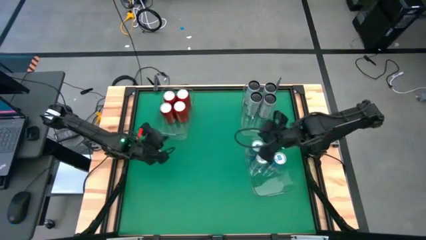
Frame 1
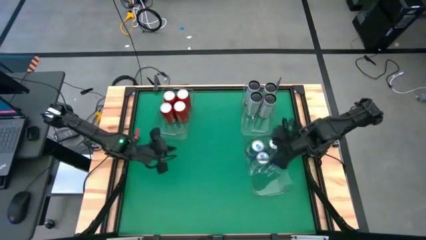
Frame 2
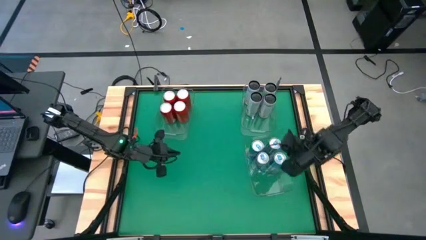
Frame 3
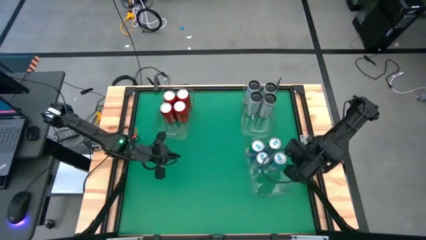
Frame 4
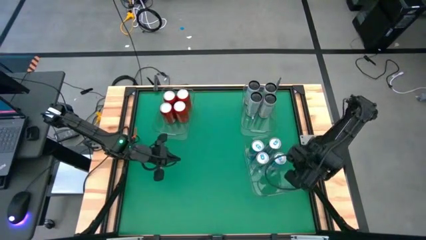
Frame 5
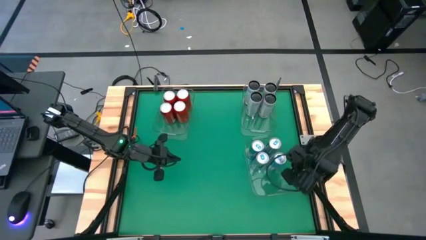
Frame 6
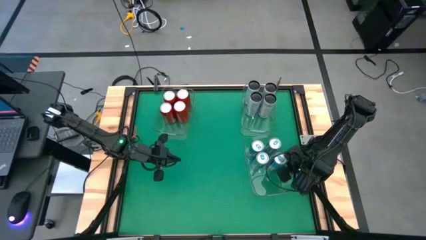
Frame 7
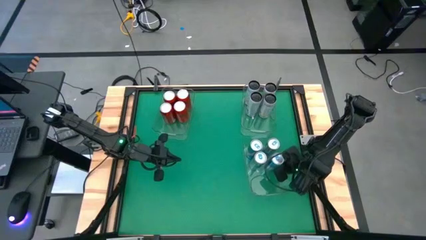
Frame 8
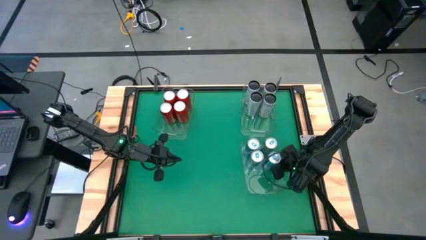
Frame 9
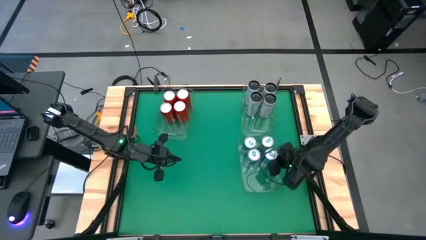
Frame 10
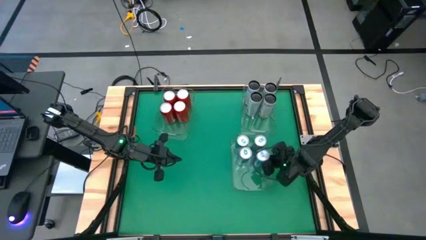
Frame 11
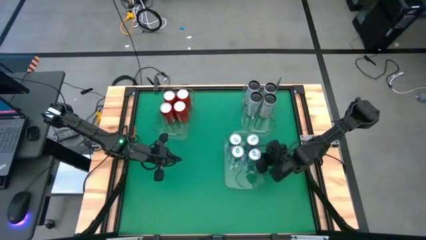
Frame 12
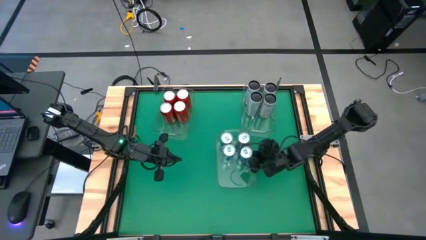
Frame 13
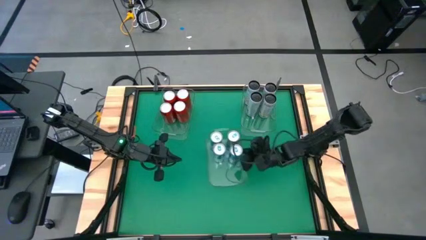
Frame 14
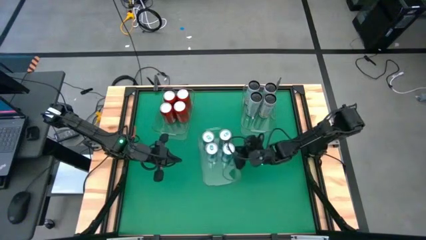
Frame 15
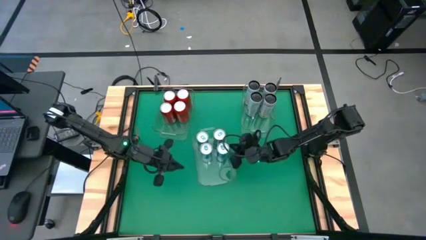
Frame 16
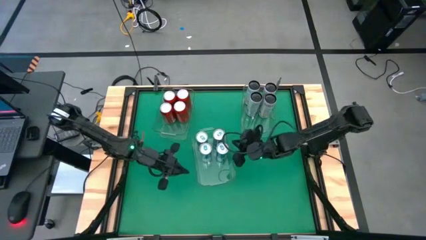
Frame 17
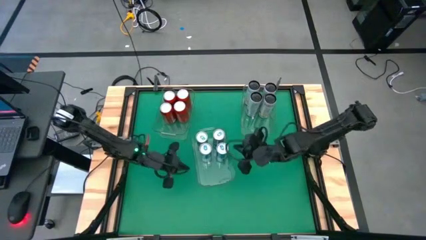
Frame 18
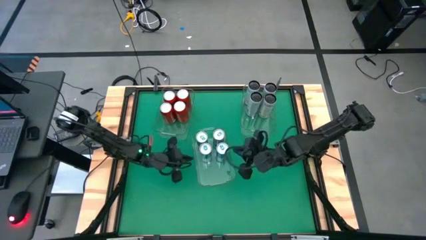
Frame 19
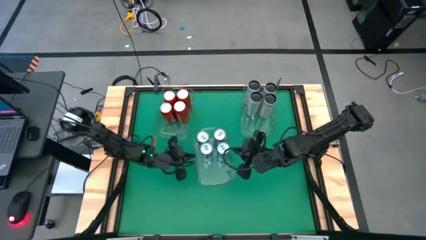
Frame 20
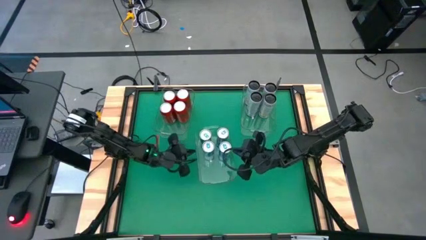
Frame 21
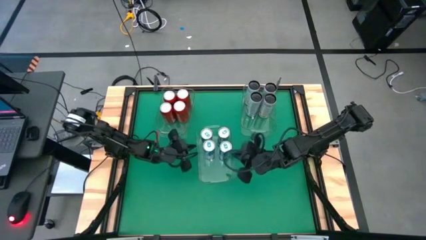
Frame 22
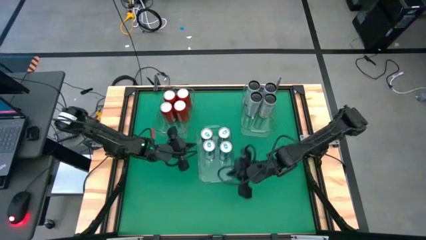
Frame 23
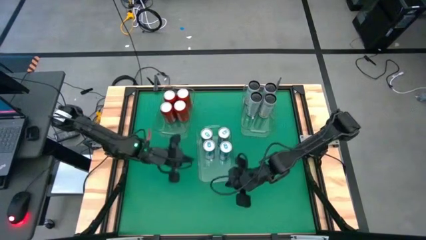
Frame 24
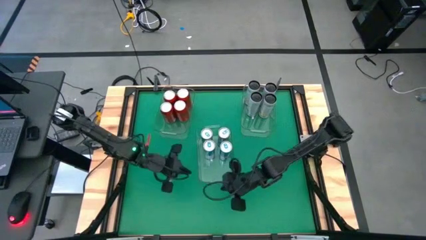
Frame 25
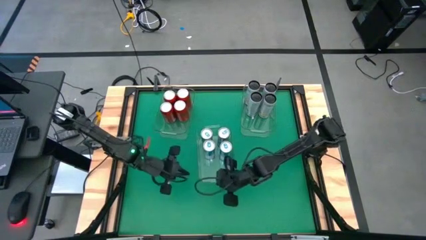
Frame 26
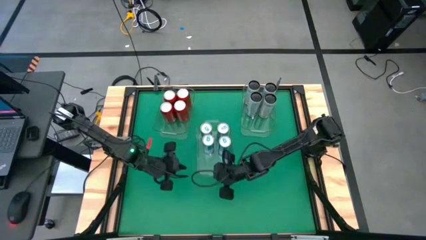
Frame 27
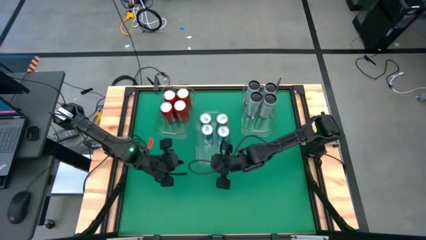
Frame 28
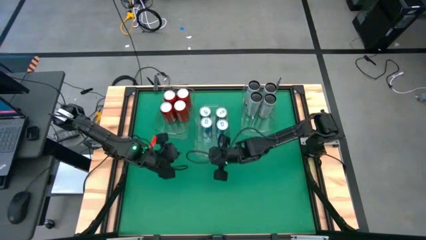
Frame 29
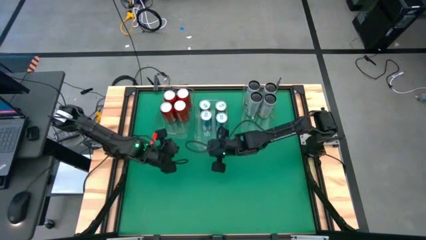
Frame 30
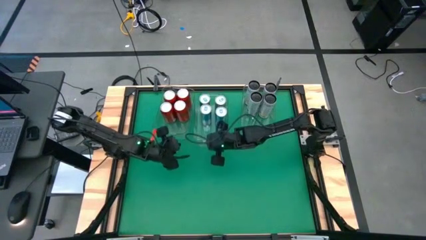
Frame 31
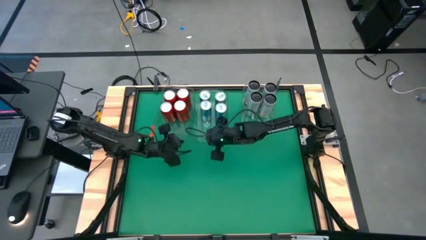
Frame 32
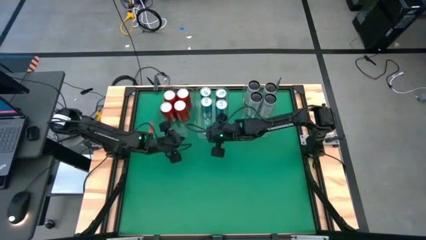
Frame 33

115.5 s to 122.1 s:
Task: Sort soda cans
Move the bottom transparent bin to the top middle of the table

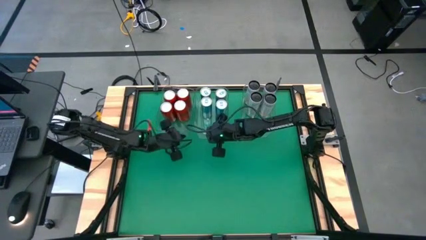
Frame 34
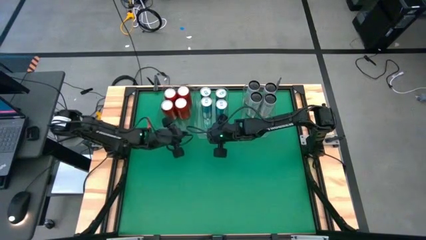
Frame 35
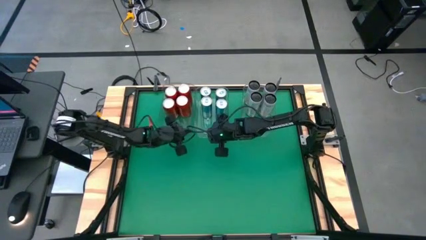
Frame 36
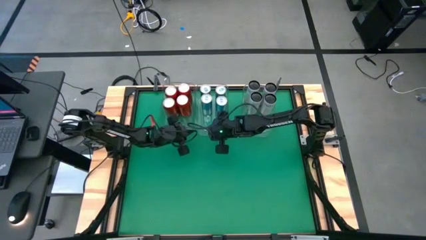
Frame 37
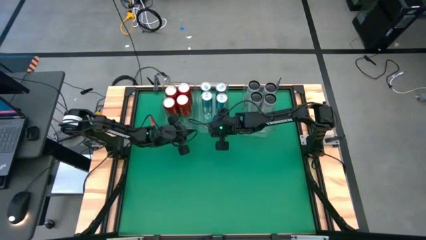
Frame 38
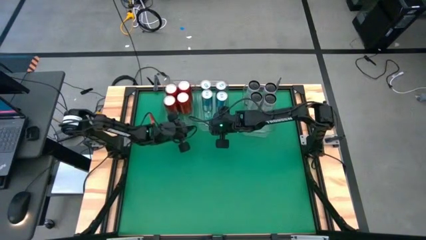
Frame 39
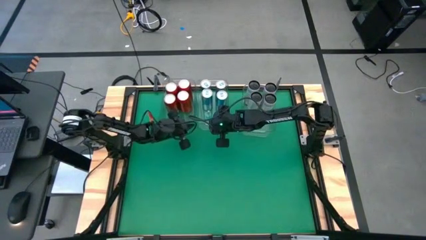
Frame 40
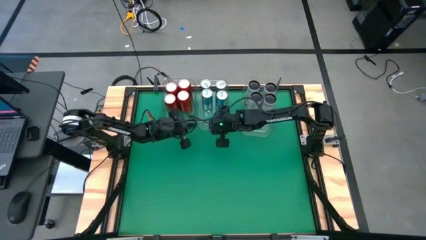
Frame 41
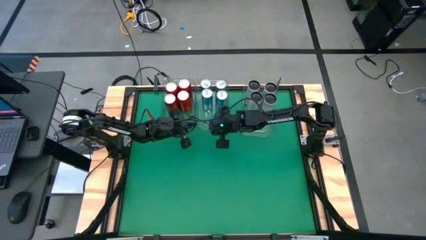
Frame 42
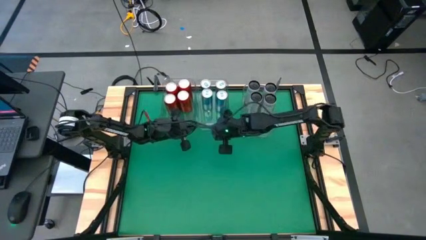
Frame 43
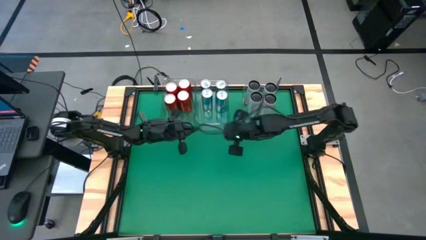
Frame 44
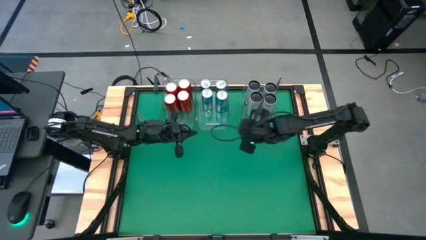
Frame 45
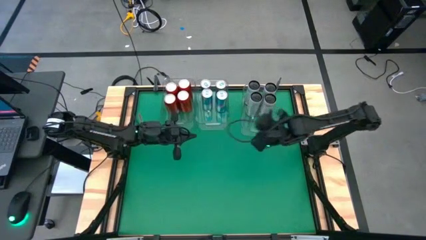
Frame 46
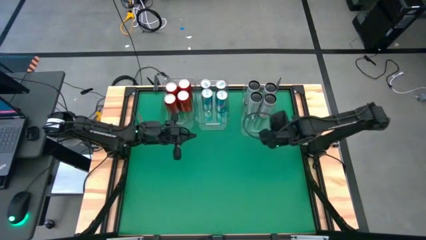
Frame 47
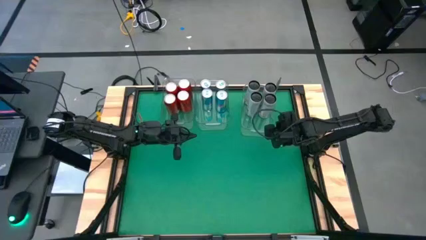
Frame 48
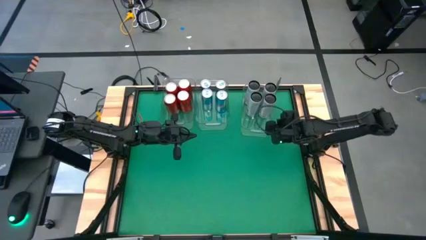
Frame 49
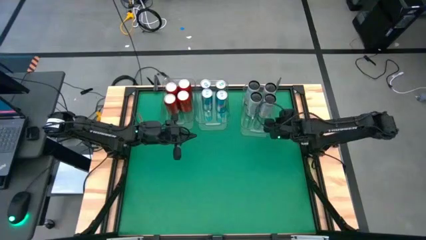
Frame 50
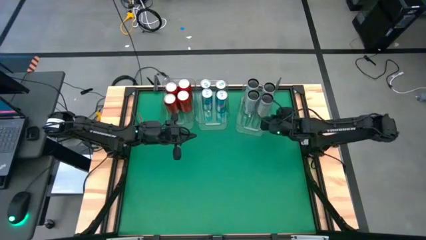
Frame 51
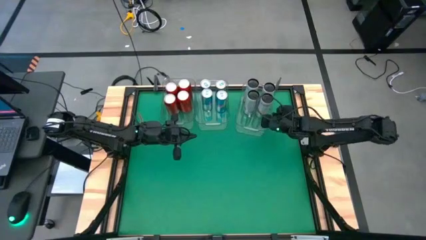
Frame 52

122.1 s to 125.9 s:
Adjust the transparent bins

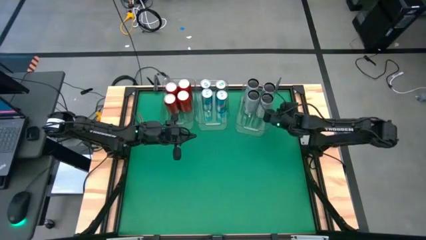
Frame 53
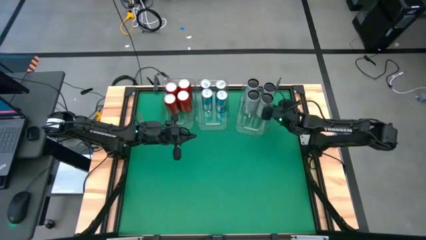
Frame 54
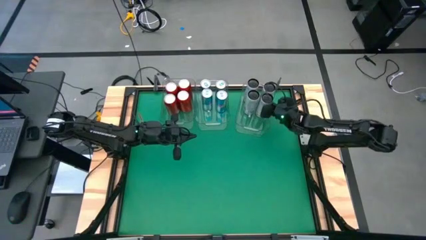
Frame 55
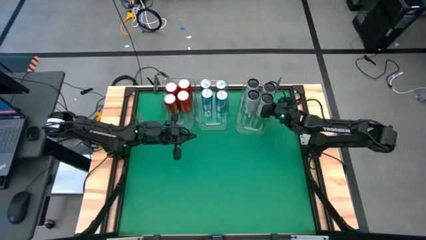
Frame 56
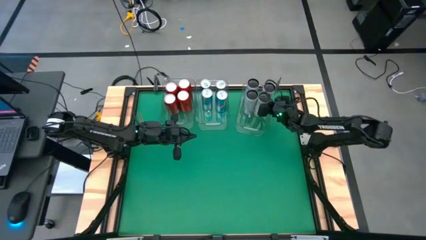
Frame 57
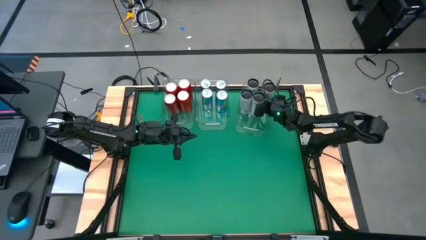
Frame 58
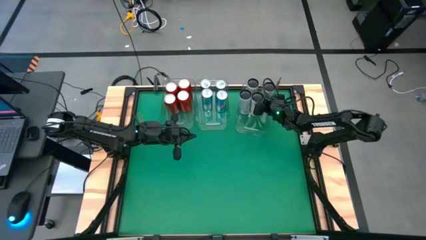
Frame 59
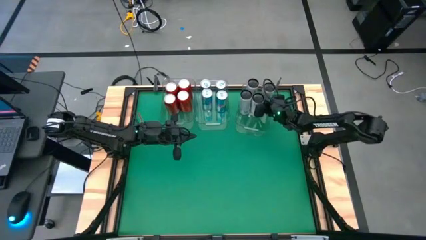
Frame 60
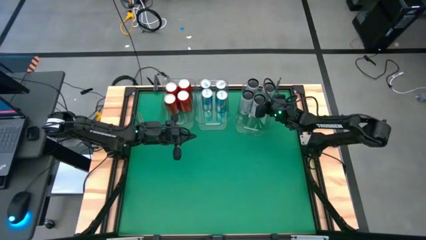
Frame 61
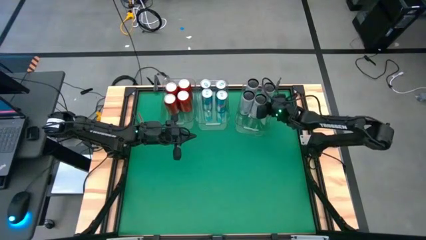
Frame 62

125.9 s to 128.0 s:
Adjust the white and yellow soda can in the right transparent bin

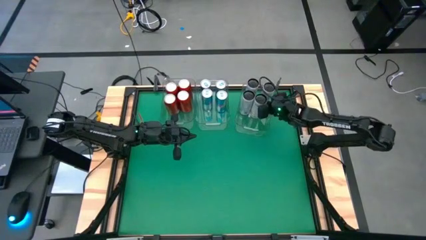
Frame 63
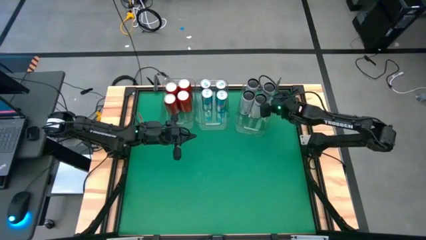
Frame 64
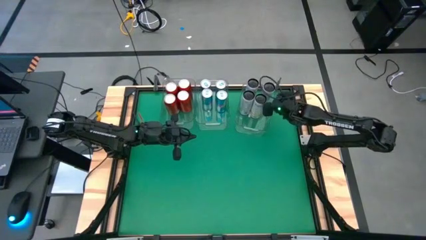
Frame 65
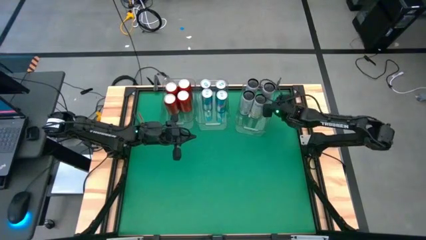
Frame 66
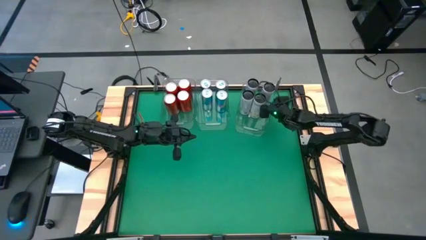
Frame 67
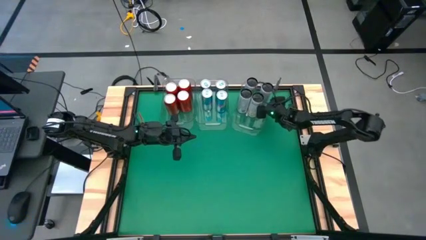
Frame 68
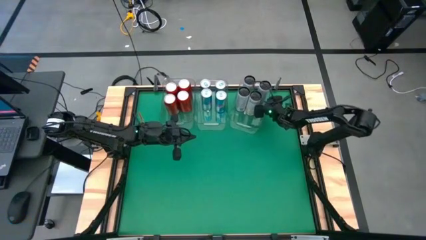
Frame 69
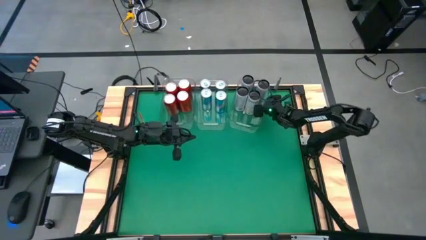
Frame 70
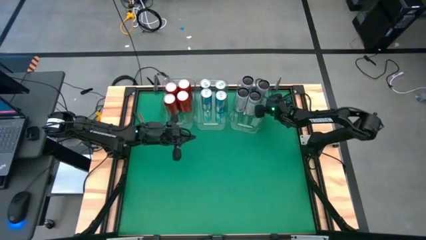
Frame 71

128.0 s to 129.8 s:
Adjust the right transparent bin

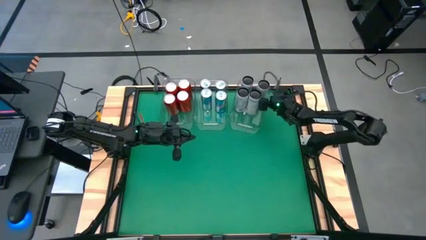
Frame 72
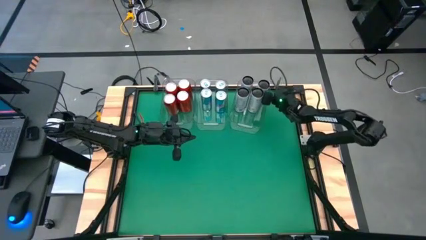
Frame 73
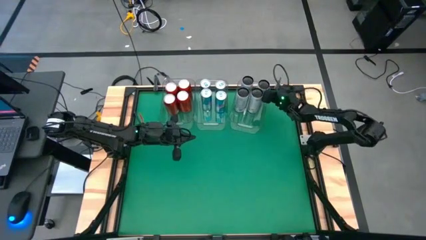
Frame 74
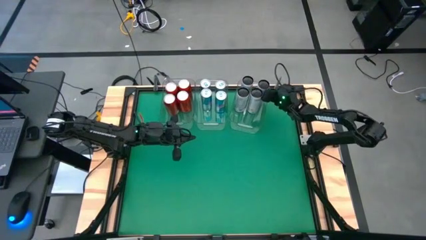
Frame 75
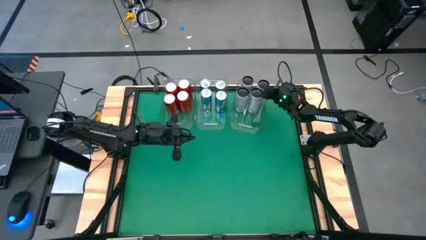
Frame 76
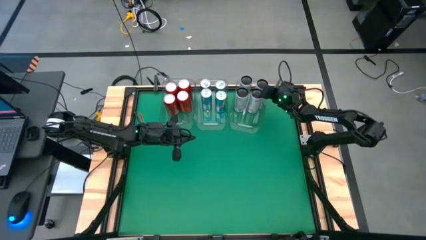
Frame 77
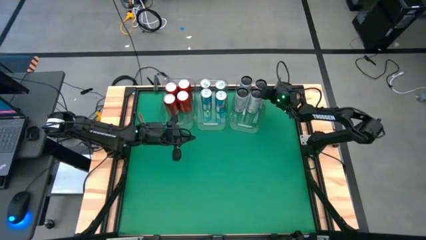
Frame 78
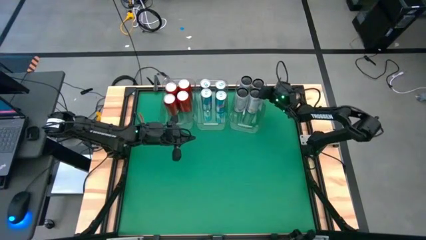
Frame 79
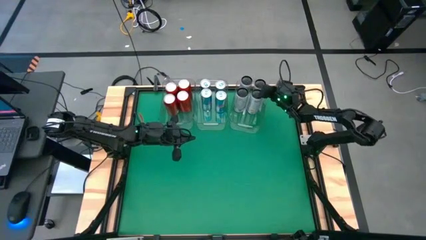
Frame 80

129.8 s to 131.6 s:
Adjust the white and yellow soda cans in the right transparent bin

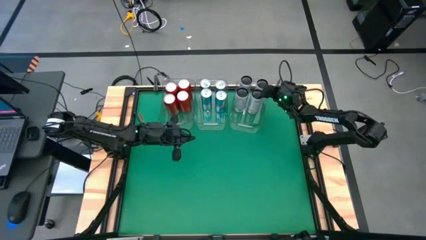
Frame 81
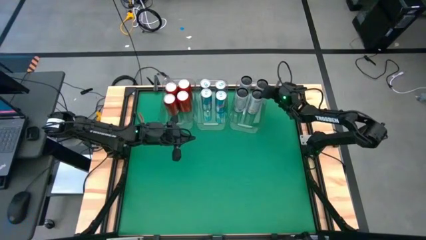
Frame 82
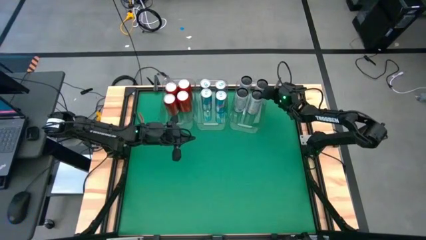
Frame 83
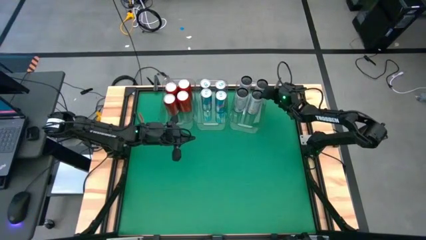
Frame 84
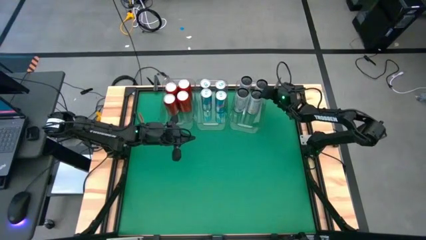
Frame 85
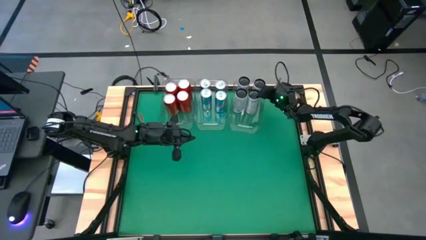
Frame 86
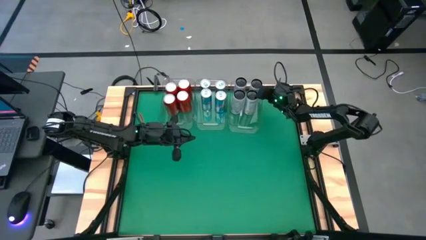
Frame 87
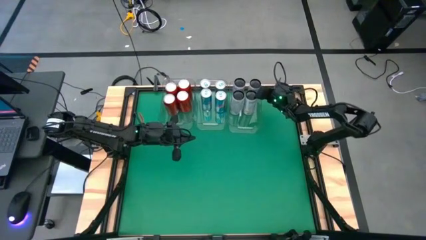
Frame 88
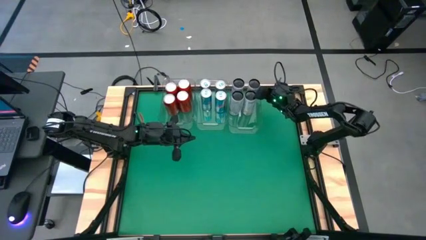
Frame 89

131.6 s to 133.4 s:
Adjust the right transparent bin
